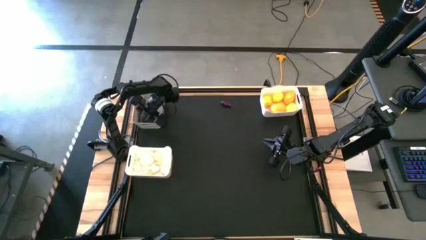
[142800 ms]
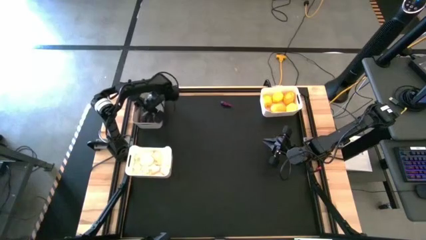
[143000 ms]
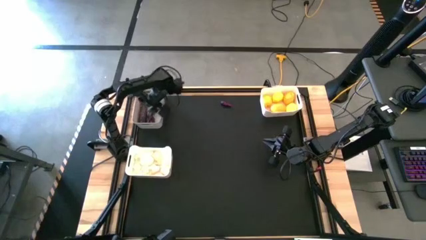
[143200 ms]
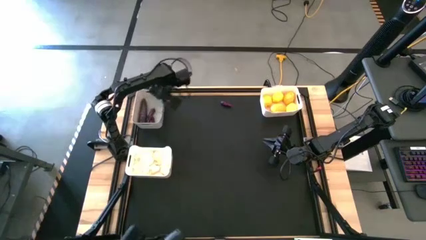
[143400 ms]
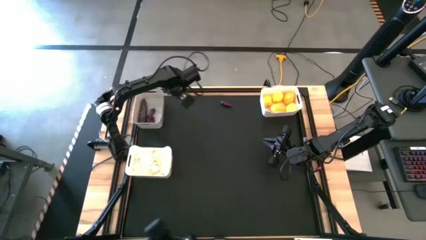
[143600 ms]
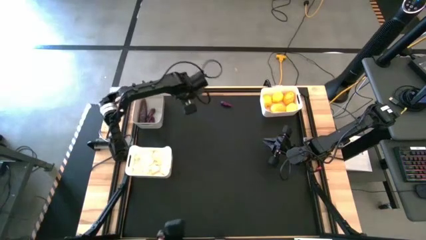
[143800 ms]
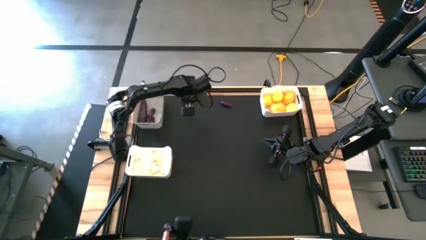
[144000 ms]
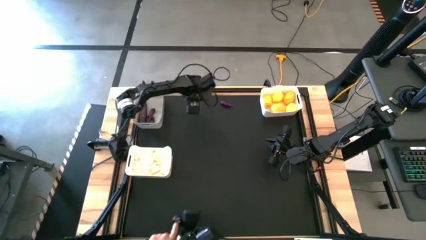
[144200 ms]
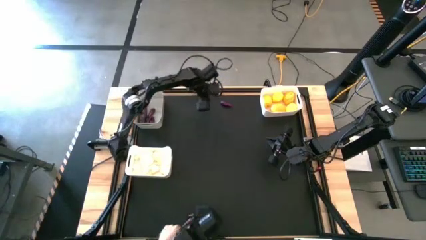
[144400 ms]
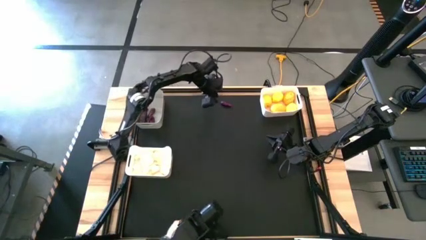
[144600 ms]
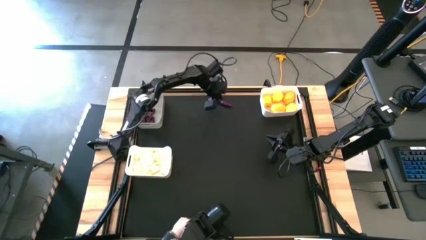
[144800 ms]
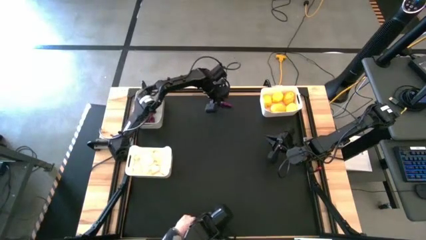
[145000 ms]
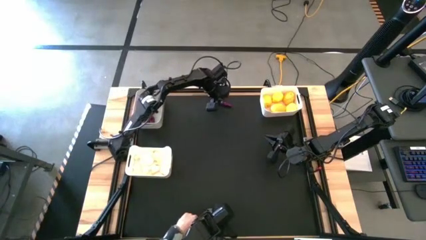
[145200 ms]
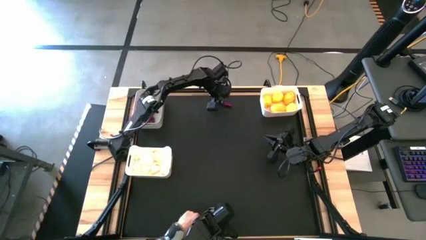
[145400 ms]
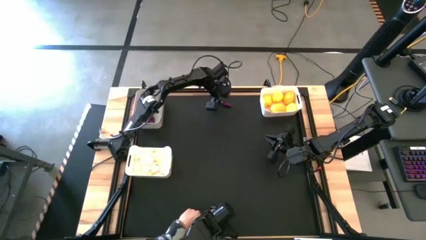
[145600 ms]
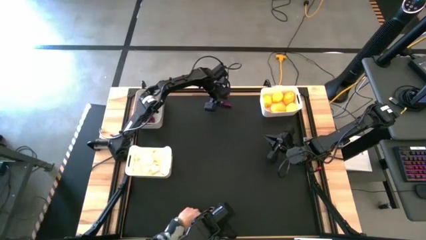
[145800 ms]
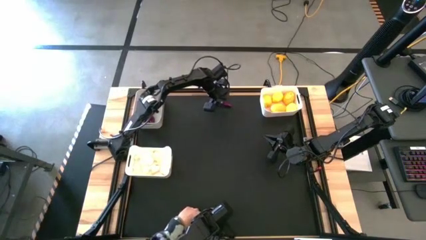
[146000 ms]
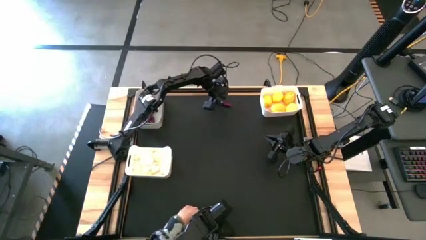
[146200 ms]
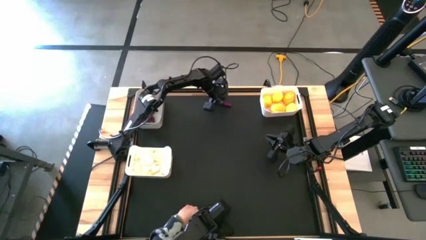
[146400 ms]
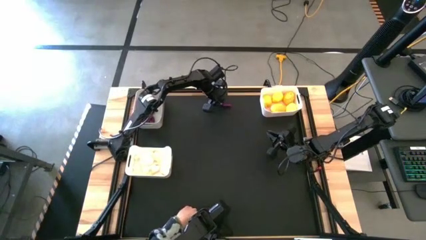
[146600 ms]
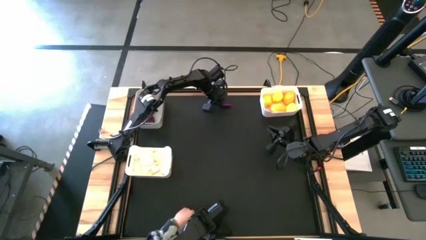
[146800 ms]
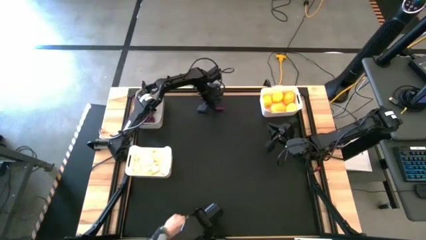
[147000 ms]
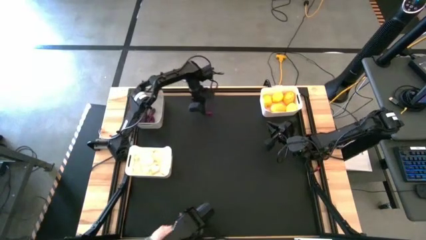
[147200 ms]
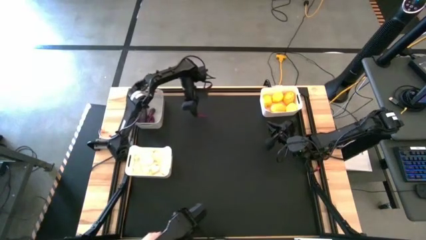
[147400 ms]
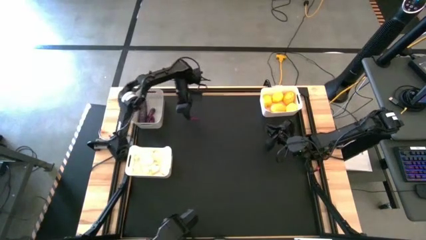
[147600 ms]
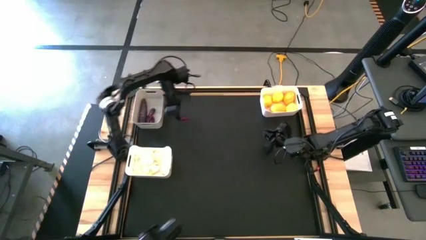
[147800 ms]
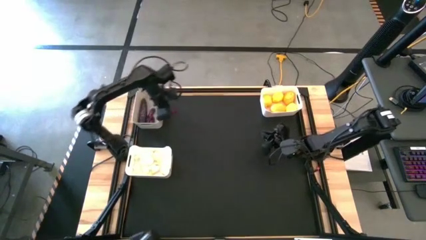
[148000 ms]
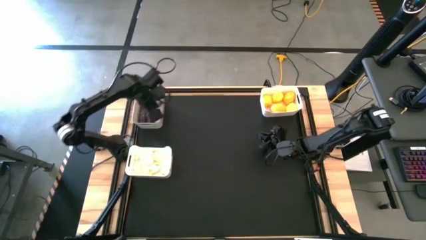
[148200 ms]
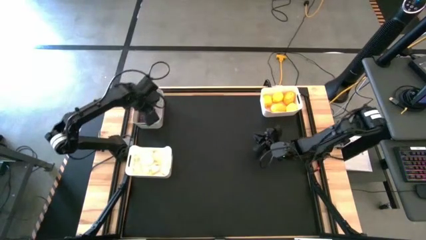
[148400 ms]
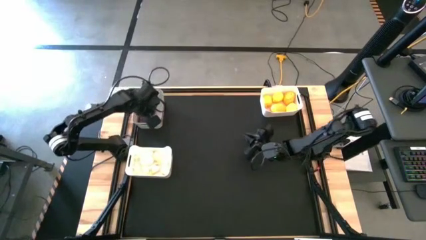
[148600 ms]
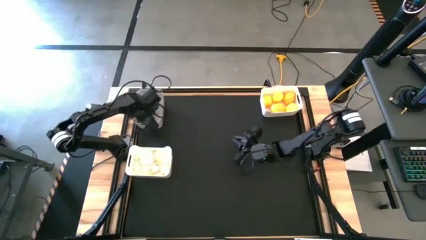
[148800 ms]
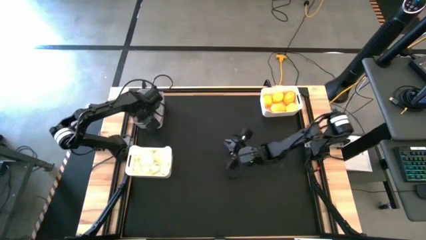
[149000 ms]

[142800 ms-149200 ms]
Task: Sort produce into baskets
Put the violet eggplant into the gray bin

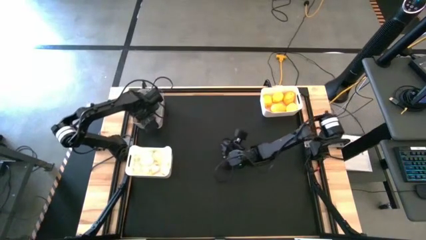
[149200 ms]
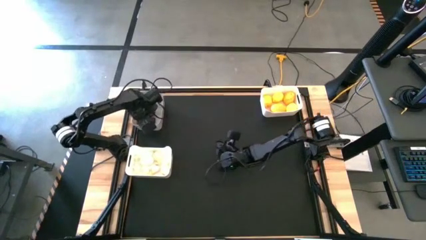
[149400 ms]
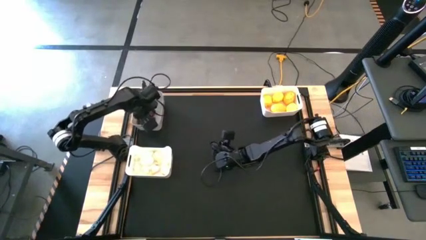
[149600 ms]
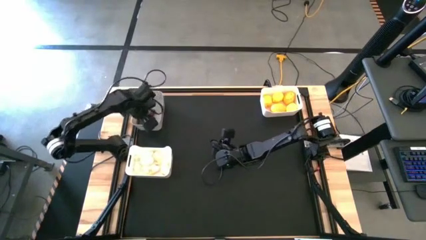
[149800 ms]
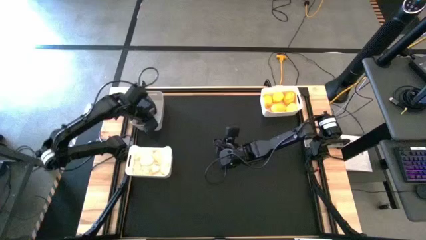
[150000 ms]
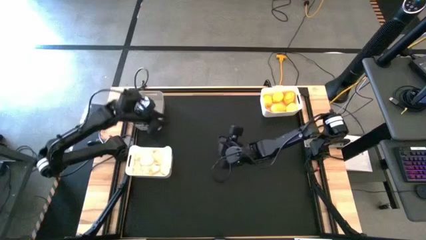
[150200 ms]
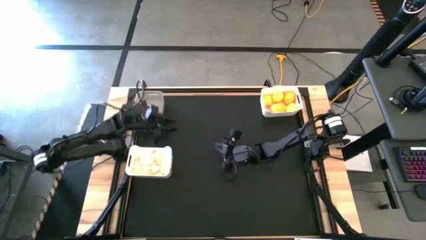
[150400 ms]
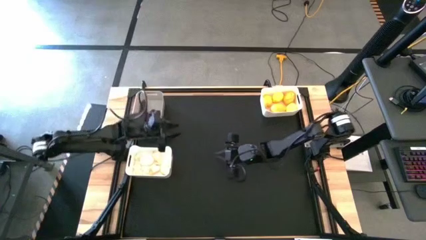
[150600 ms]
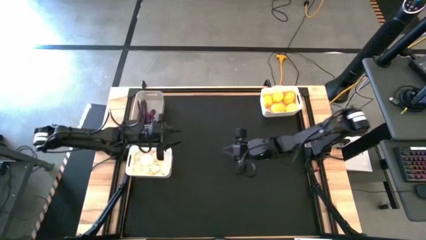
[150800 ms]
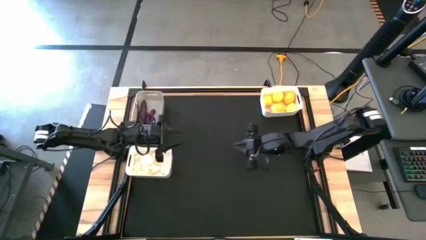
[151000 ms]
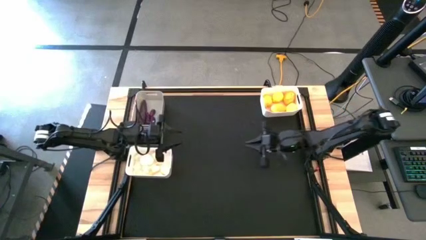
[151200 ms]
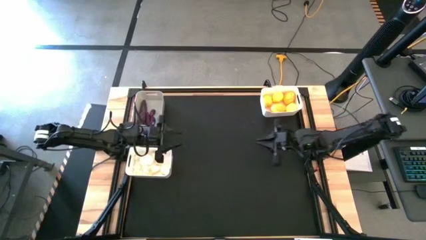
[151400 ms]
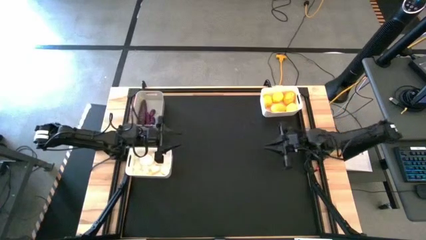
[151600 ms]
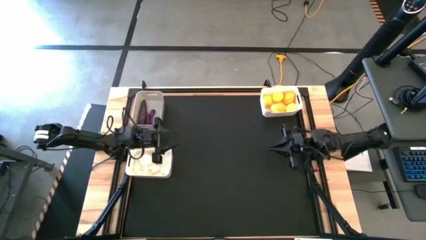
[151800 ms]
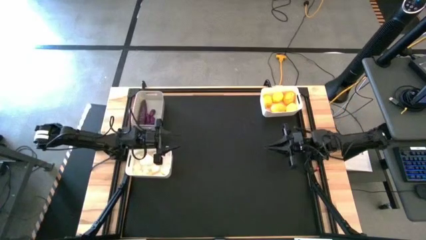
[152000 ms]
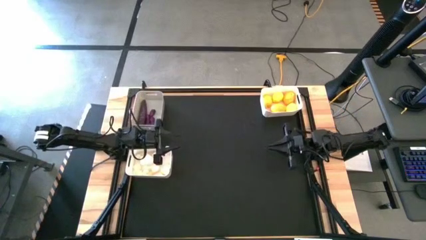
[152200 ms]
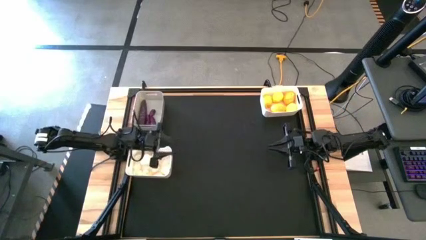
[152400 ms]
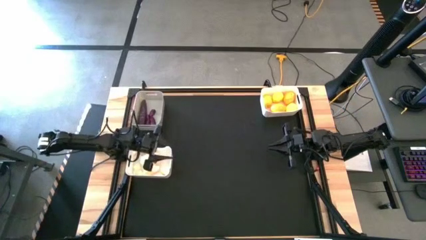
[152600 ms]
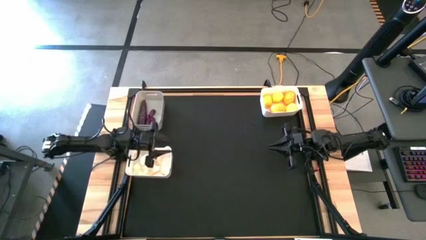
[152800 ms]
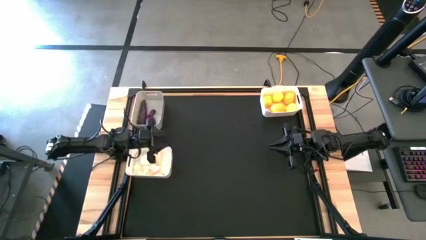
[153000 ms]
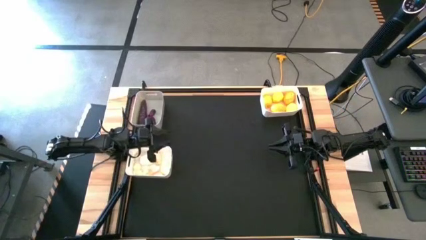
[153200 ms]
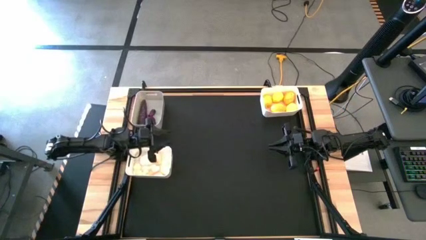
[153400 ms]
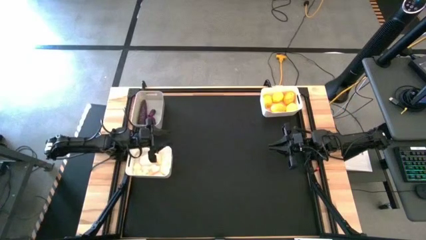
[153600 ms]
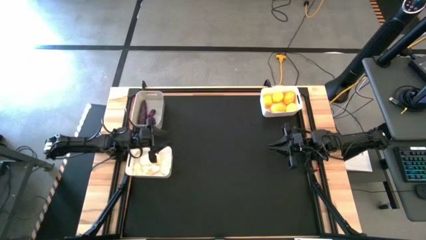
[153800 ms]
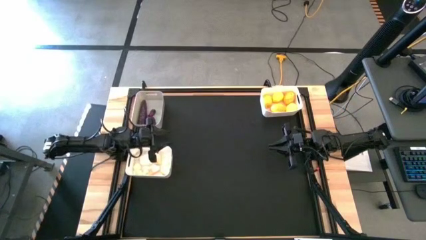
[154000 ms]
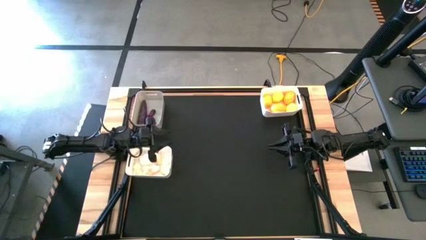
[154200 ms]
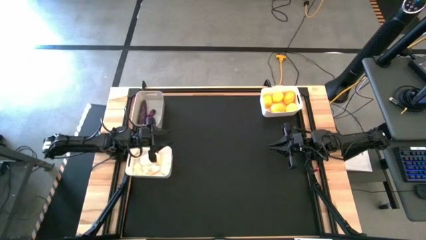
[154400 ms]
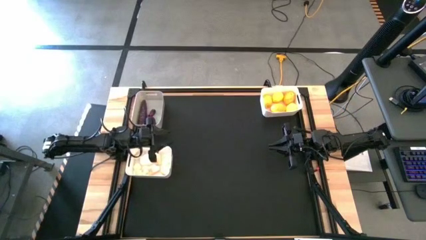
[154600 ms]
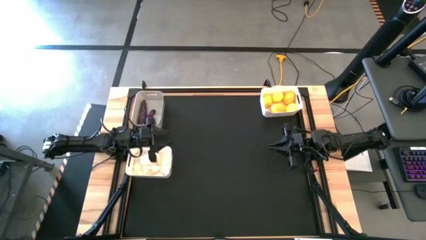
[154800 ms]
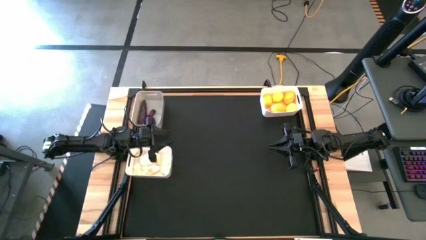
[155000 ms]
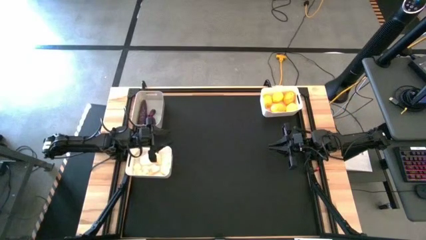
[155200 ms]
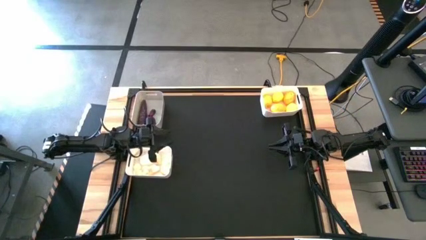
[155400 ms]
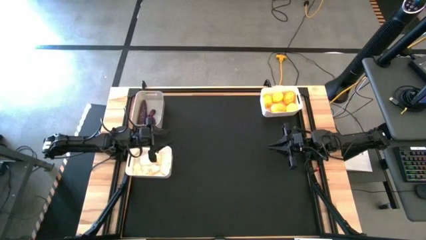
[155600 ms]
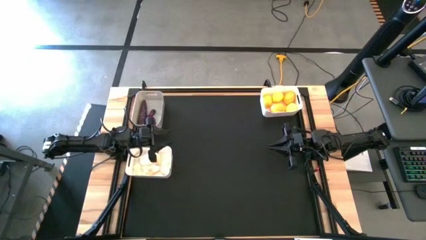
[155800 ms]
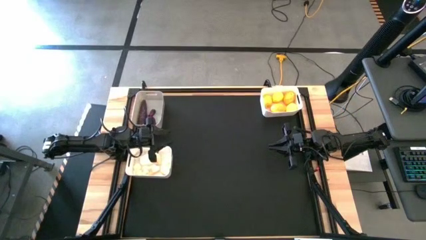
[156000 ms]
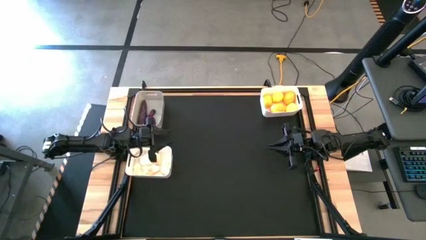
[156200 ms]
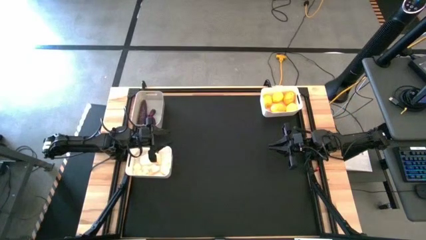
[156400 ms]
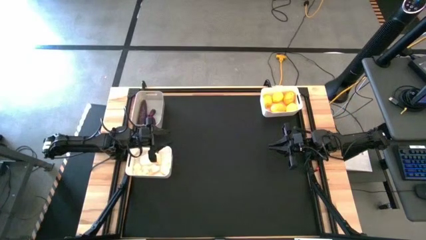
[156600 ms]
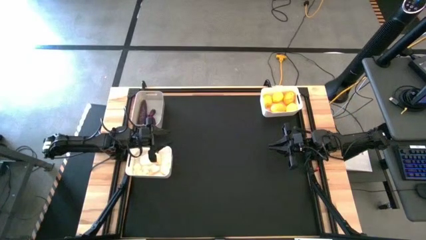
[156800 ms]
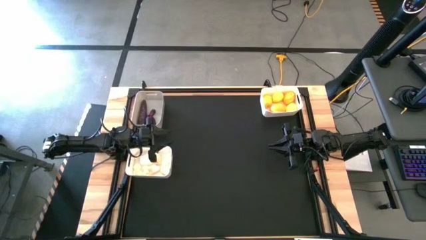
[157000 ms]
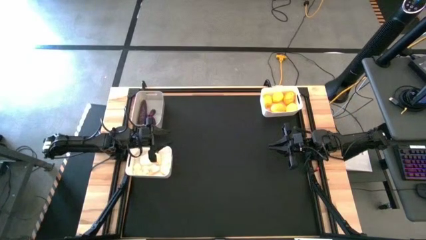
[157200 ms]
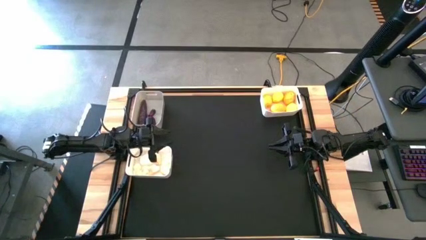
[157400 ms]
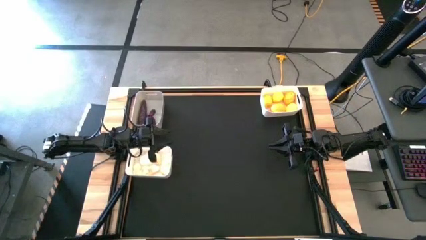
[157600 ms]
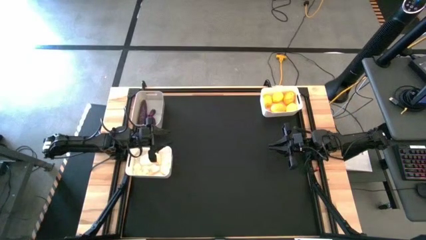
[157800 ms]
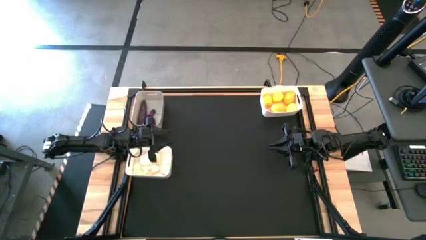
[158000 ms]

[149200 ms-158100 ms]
Return to Home Position

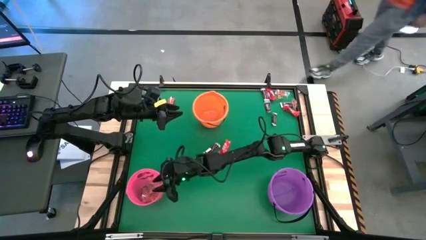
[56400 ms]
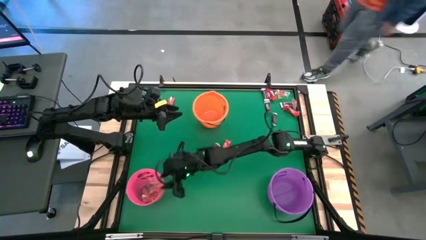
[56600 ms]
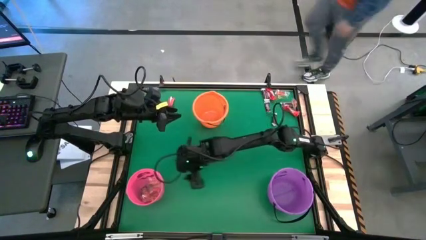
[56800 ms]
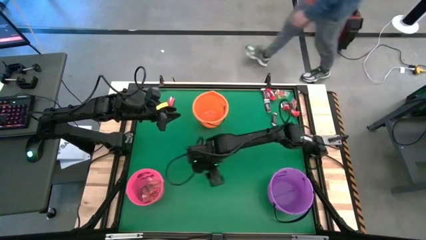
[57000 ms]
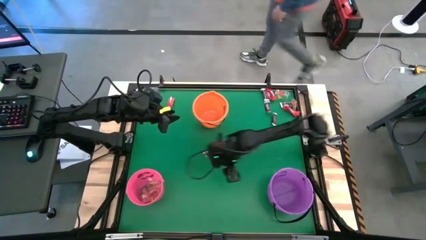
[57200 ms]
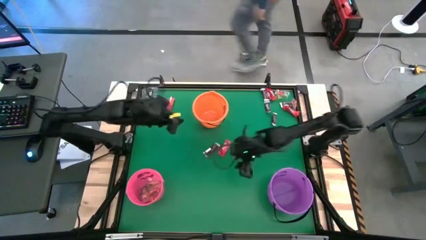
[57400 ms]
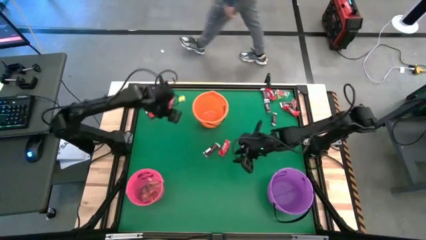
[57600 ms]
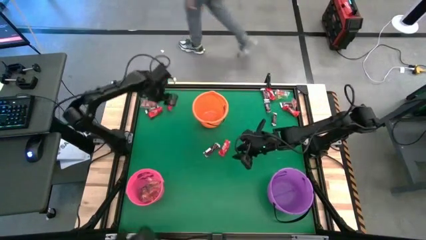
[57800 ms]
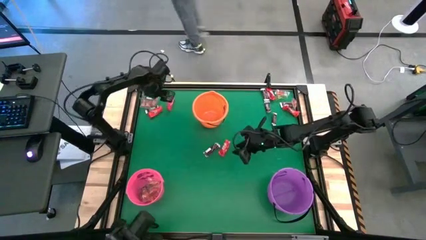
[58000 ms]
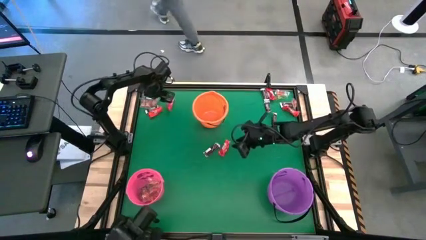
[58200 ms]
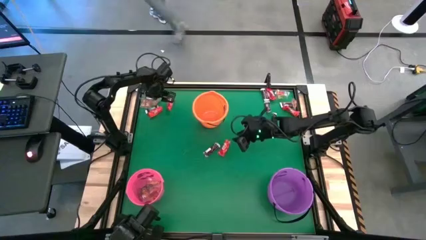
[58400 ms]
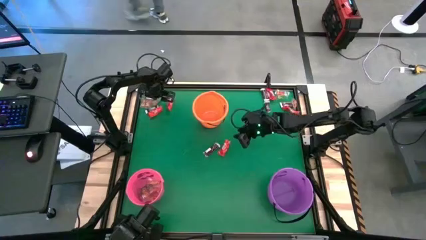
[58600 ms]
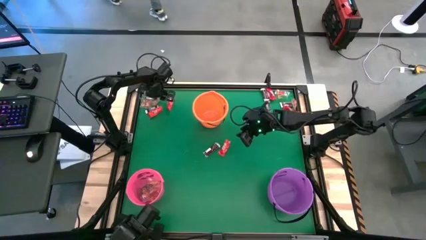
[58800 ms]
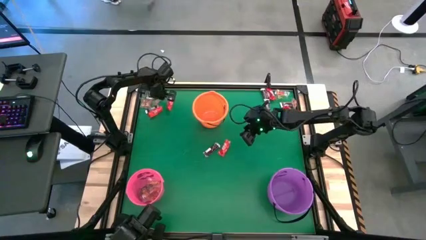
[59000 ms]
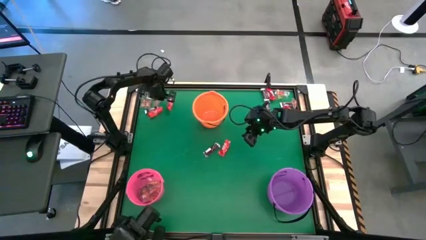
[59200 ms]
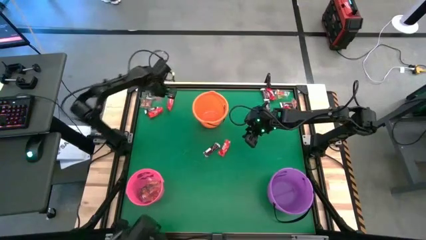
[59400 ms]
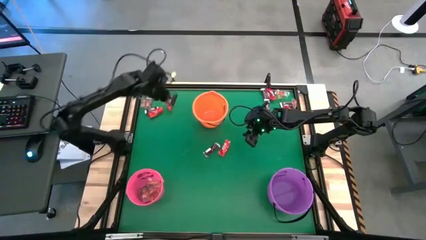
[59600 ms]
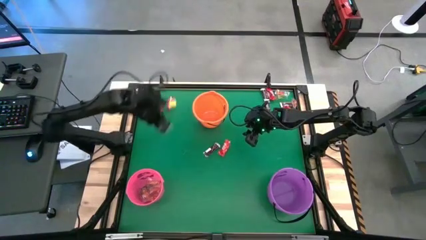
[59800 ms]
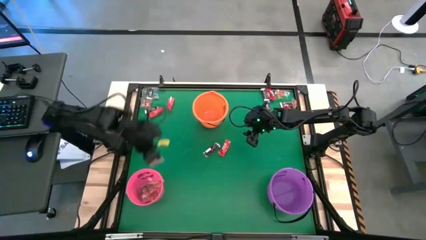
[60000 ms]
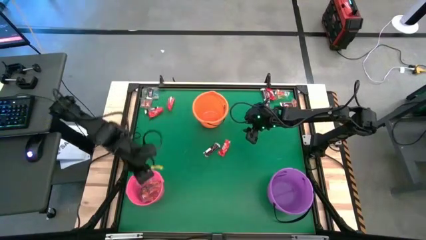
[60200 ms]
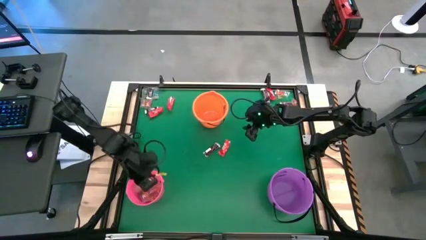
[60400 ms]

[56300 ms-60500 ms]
Task: Sort candy by brand, put in halloween buckets
Put the orange gummy into the pink bucket
